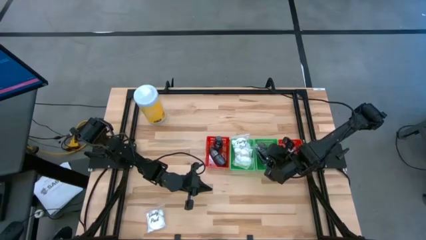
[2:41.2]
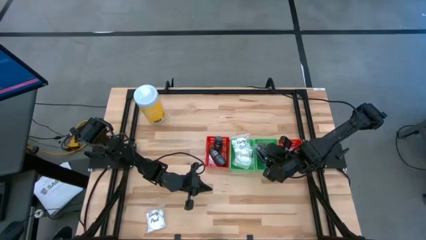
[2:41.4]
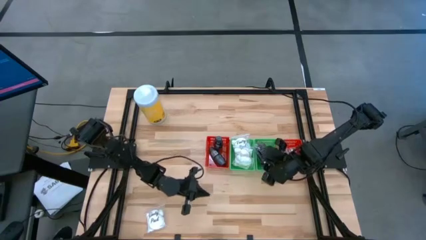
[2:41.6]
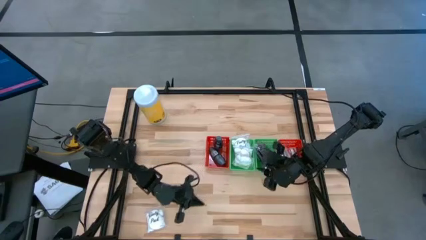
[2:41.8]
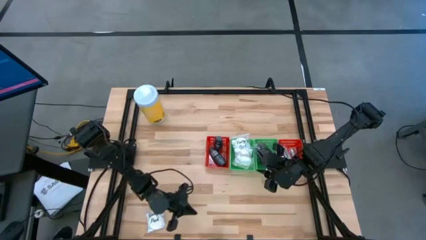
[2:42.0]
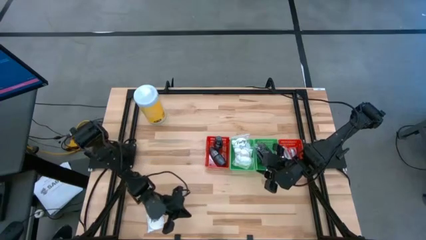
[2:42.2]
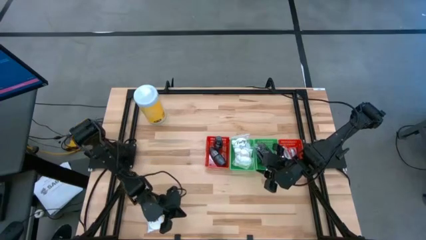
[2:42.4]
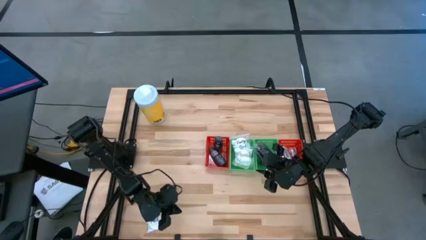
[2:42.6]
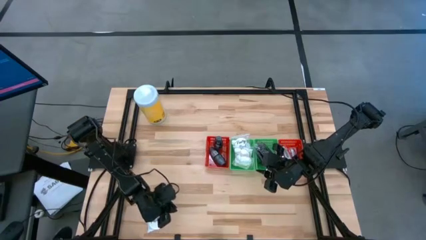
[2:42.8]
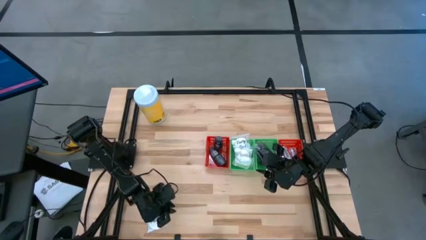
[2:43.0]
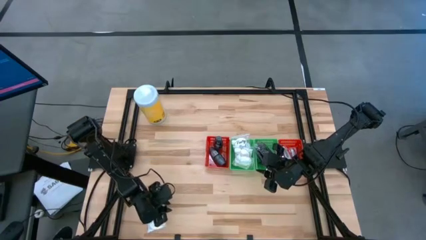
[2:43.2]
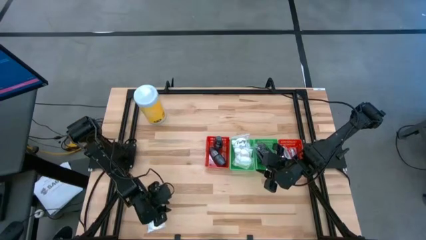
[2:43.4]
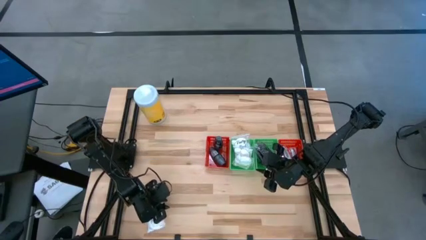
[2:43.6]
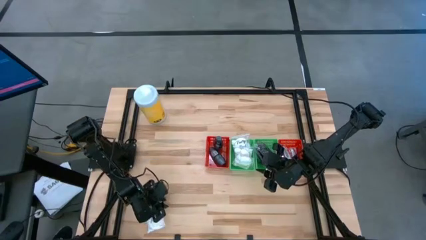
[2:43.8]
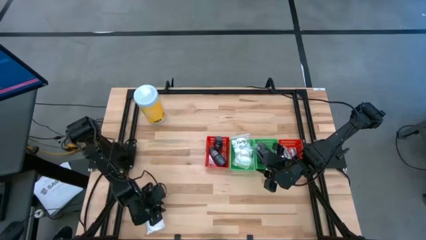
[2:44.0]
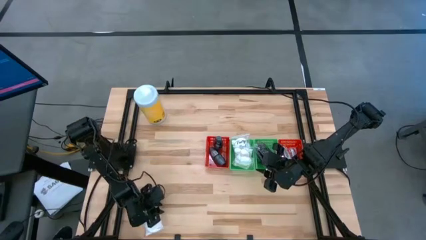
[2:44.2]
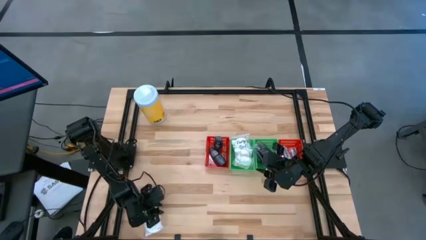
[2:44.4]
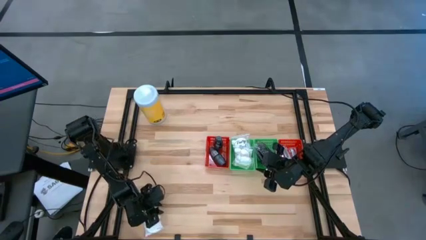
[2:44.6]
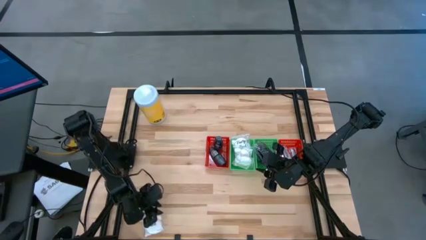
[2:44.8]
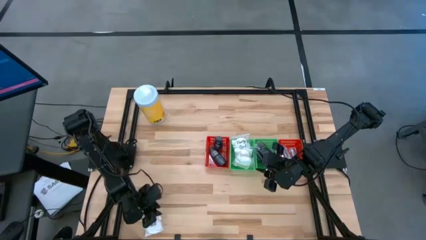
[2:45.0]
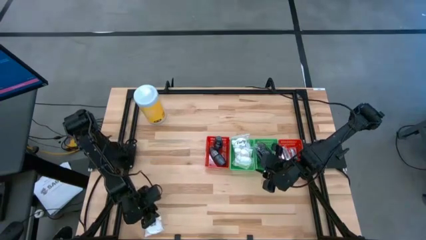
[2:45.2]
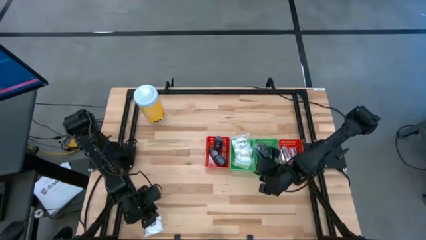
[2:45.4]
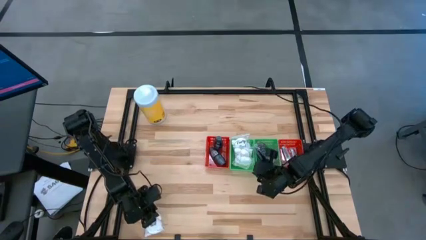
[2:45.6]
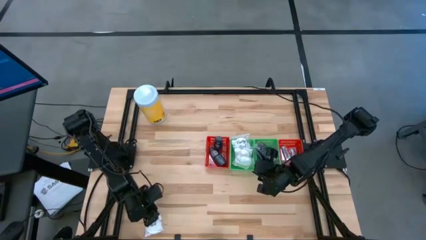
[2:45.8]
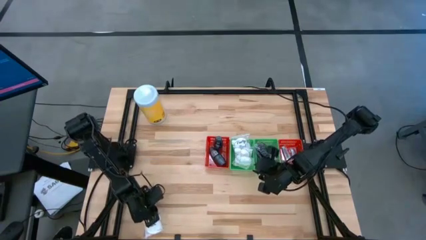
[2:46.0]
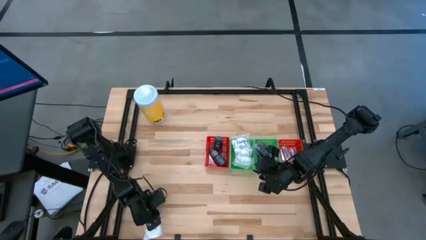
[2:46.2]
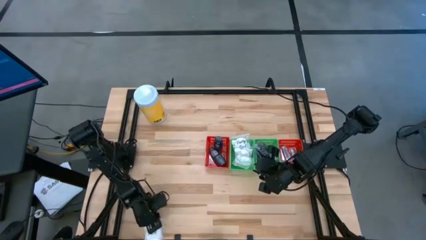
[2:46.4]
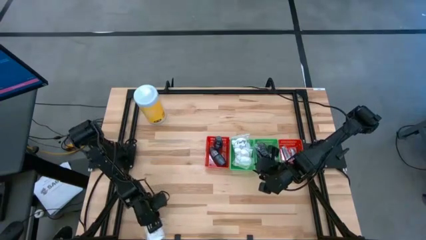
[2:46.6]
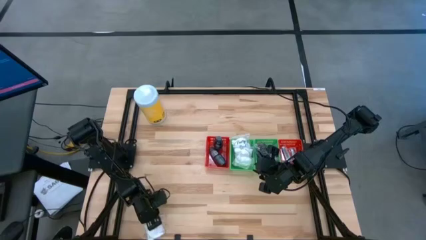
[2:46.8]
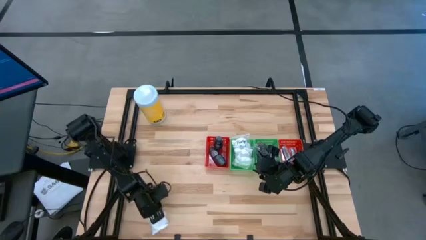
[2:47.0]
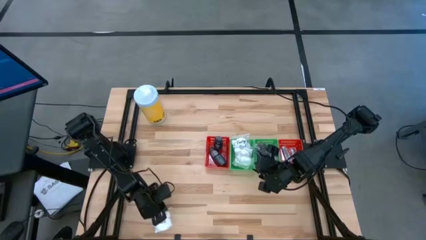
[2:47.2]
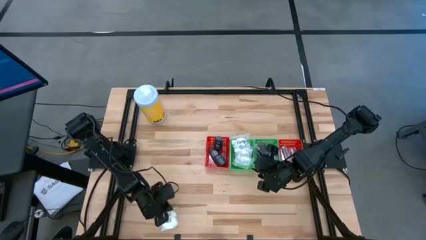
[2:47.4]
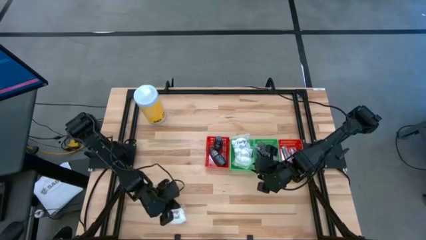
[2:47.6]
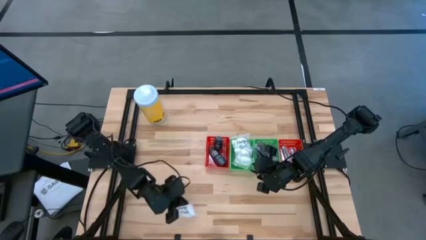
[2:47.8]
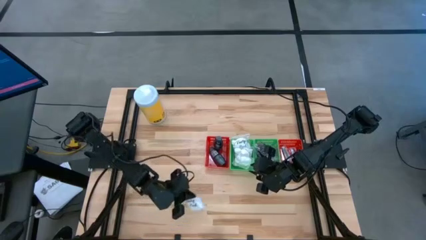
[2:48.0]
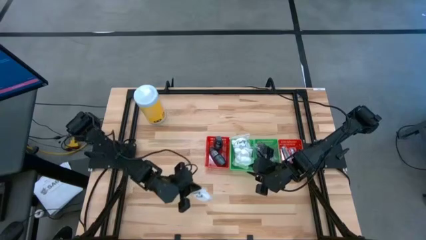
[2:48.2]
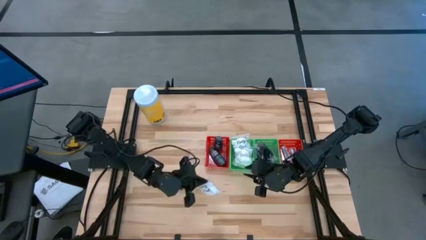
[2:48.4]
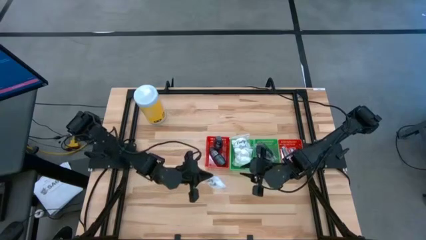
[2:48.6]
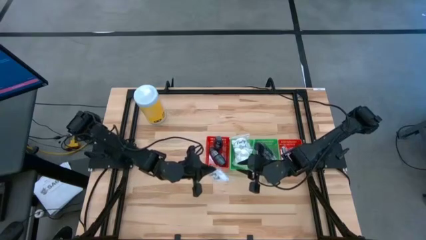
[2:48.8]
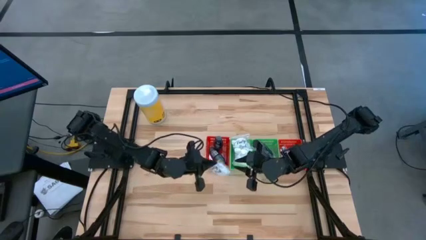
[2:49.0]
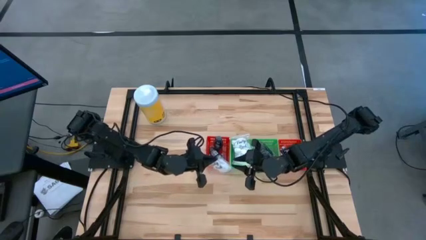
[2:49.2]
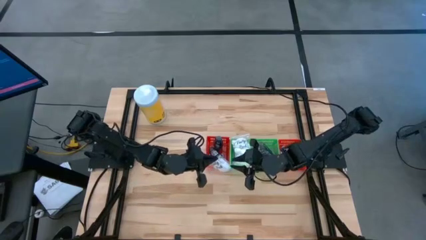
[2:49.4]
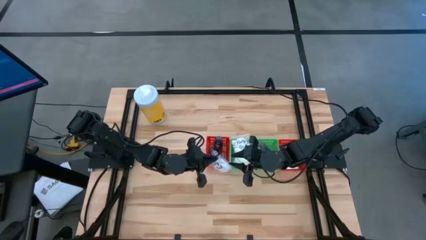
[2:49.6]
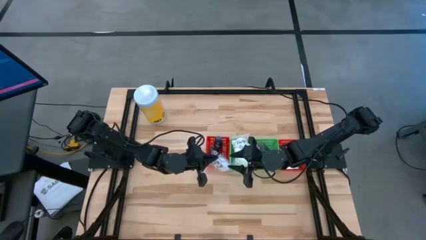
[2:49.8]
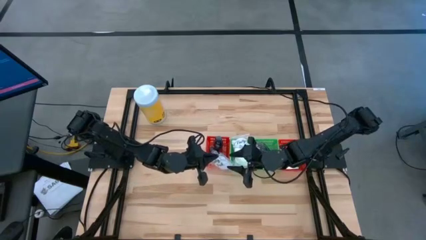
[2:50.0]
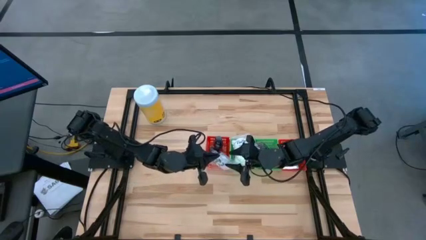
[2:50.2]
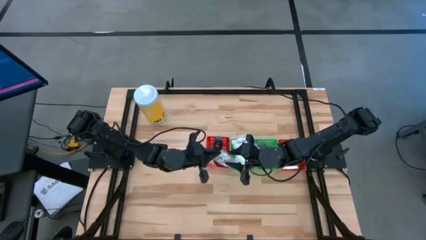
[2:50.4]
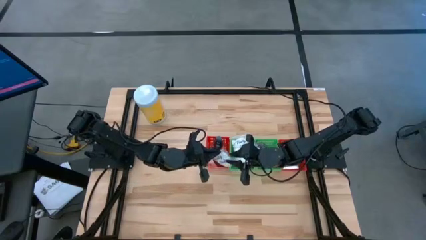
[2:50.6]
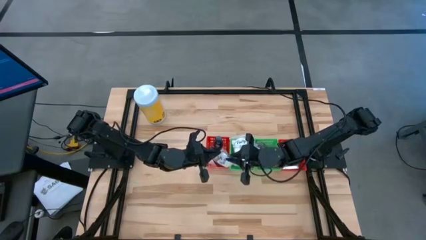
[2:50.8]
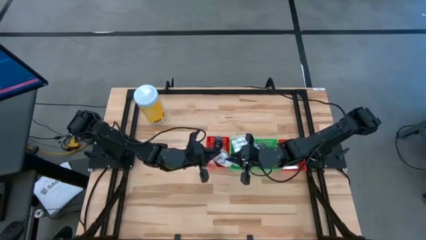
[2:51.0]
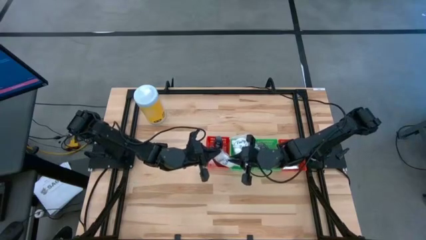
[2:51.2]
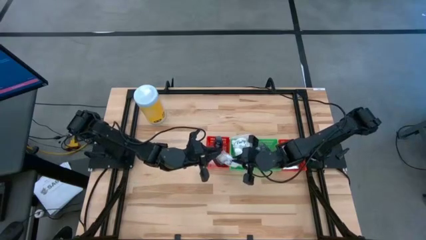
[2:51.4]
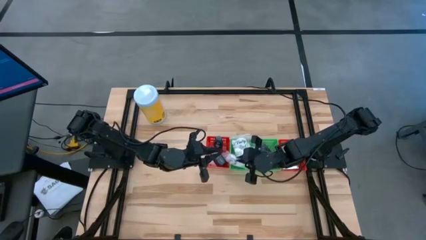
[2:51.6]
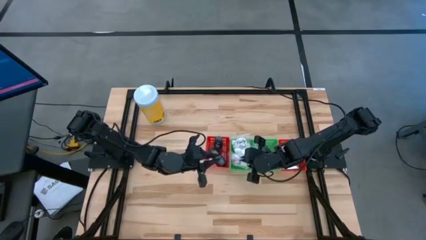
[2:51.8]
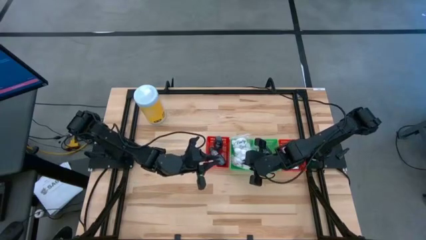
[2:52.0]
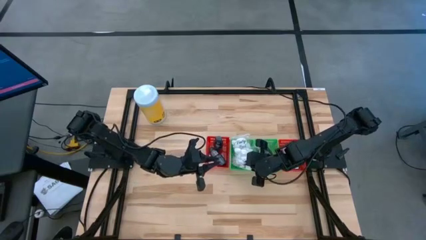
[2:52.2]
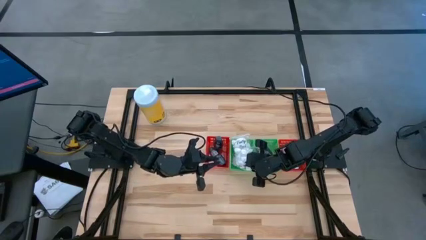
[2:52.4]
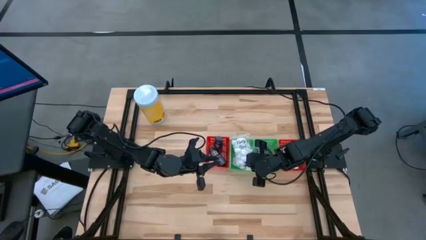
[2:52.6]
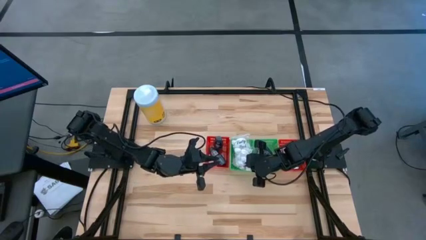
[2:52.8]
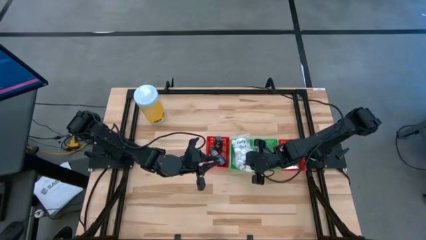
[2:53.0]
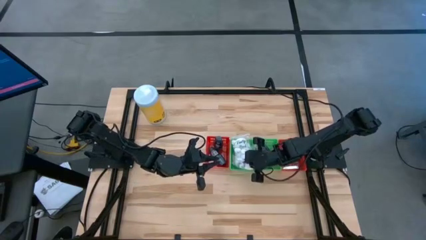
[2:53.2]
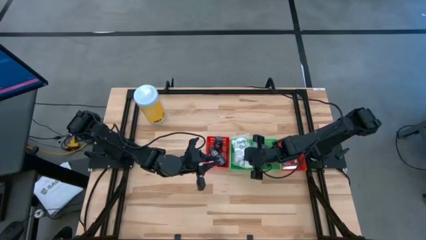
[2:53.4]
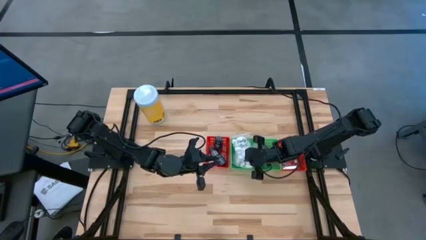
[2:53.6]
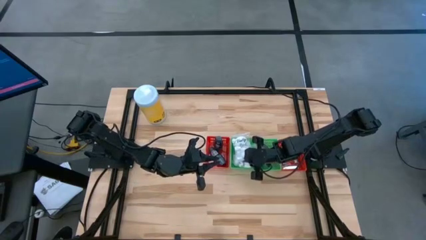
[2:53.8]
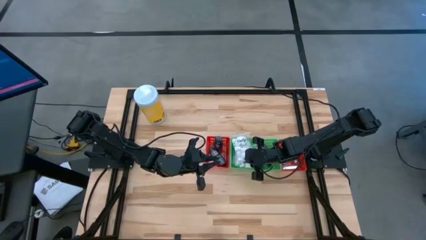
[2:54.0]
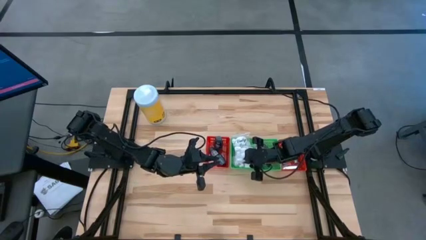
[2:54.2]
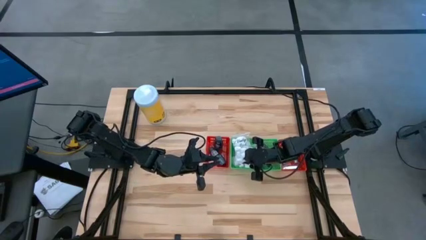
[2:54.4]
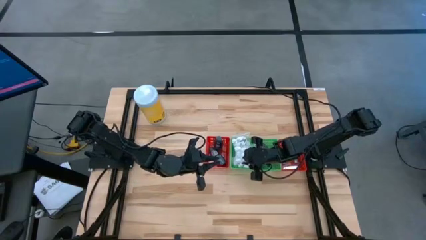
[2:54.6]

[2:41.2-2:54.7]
Task: Pick & Place Travel size toiletries
Put the cotton pack into the left green bin

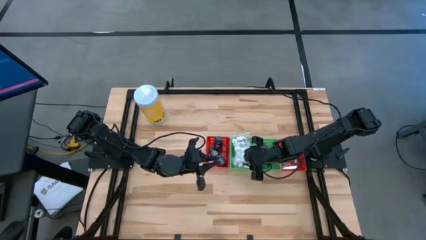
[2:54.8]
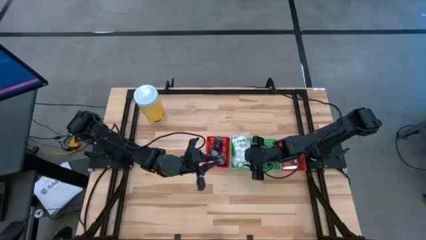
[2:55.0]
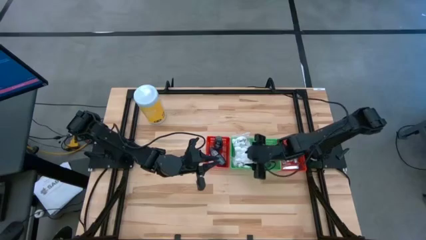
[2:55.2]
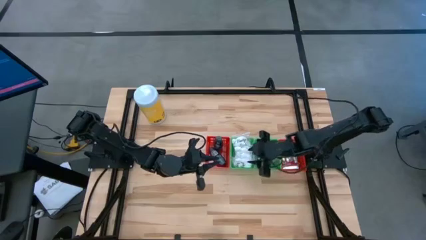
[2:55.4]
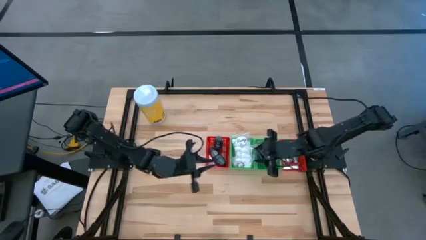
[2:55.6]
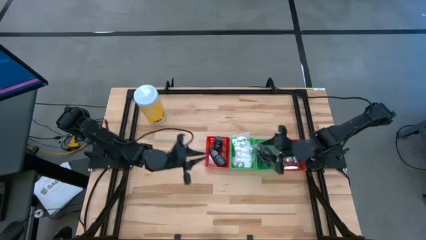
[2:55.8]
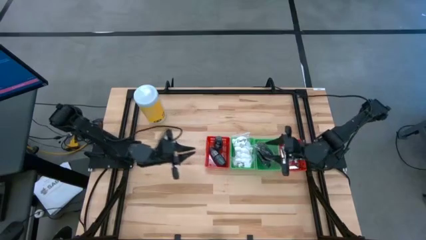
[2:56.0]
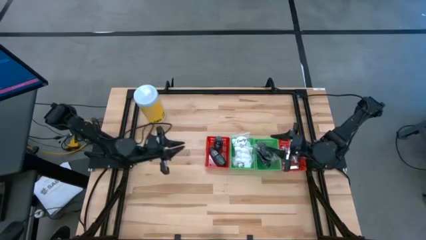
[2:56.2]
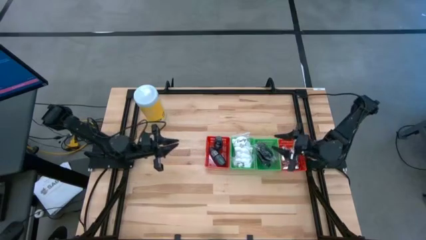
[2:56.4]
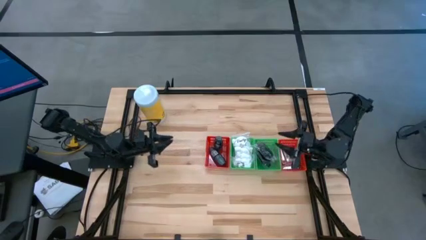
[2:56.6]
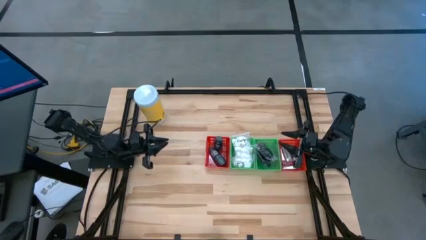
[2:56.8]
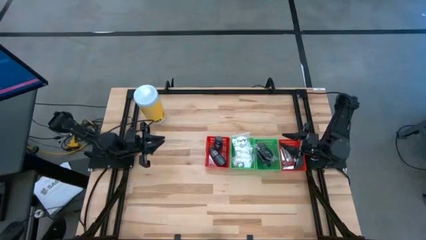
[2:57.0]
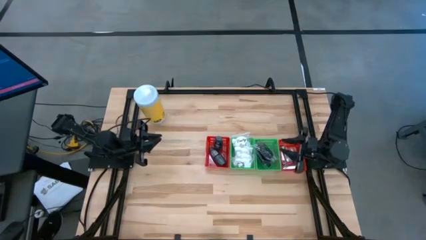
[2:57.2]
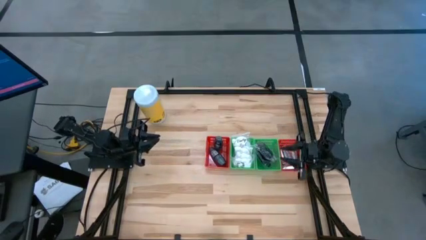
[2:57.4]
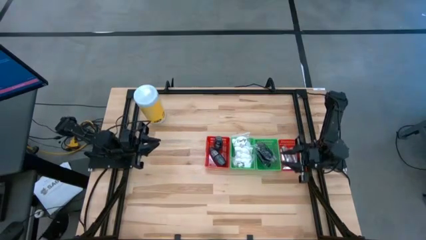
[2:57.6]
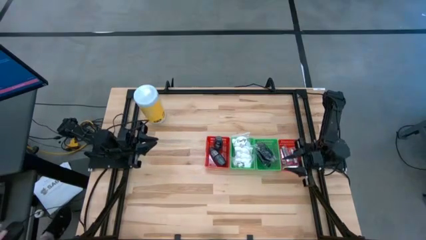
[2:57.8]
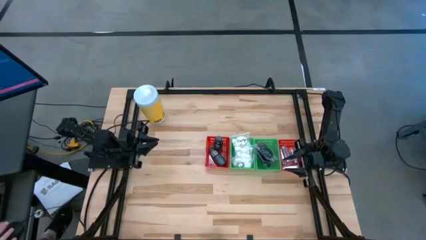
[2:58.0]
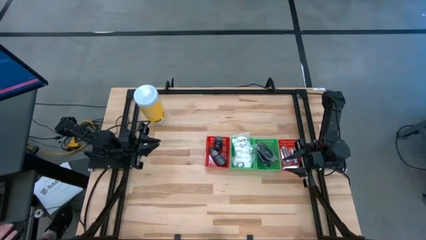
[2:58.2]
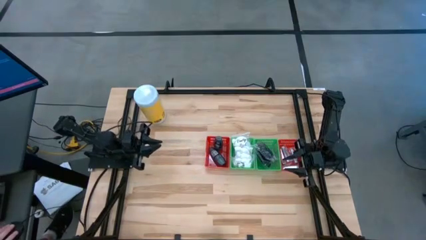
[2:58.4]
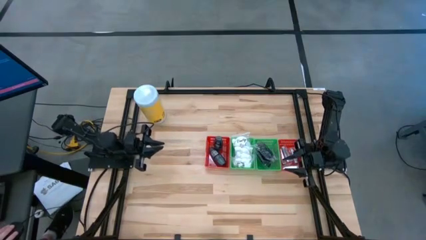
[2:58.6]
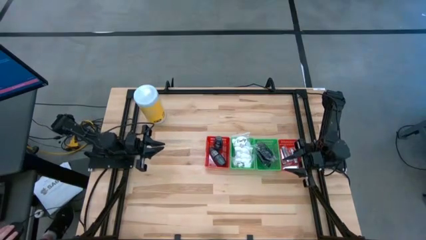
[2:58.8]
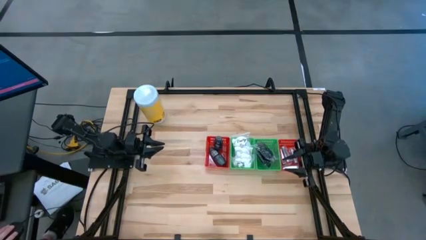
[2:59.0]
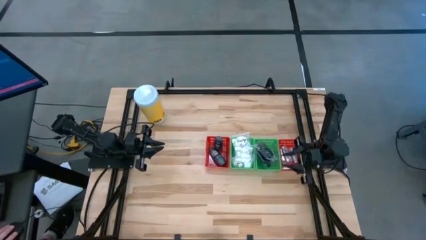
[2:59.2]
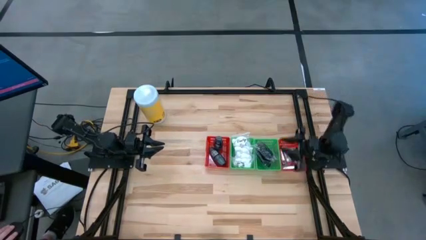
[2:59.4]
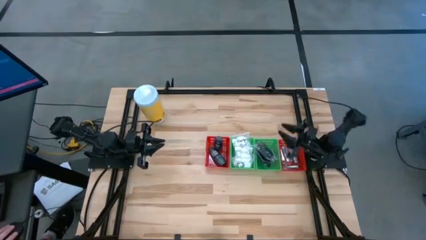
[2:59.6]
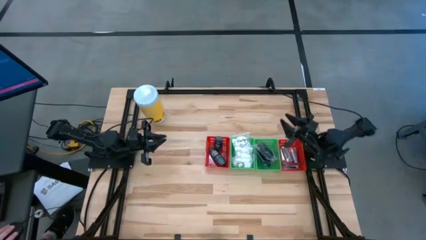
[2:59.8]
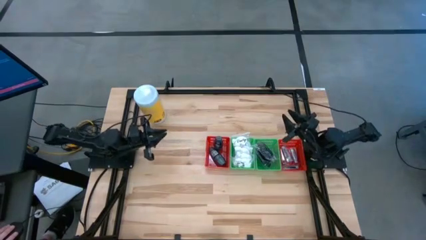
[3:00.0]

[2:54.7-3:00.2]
Return to Home Position
